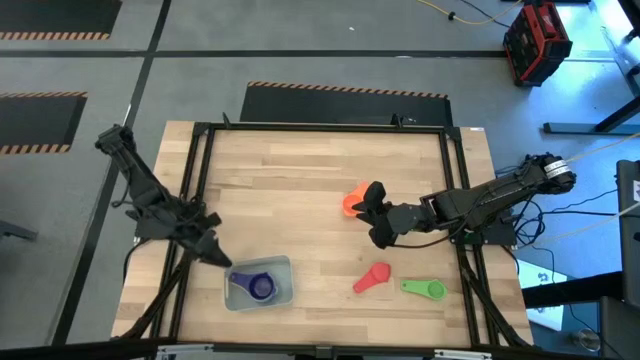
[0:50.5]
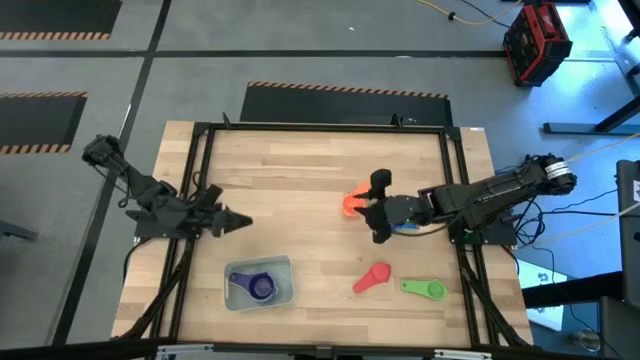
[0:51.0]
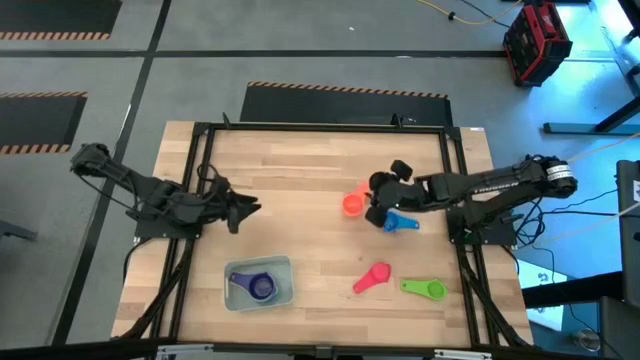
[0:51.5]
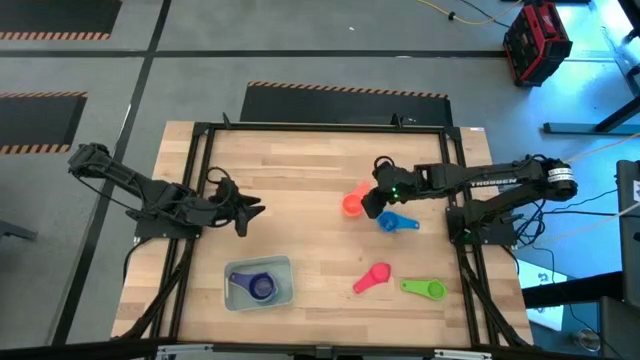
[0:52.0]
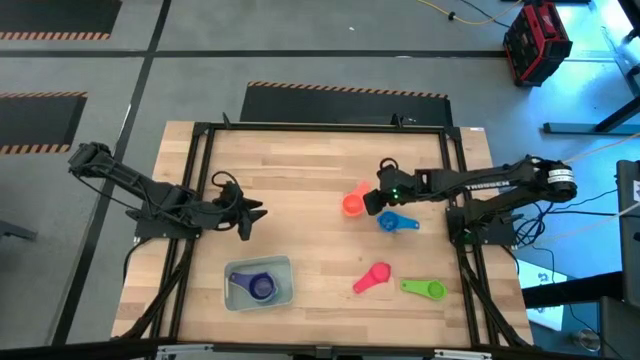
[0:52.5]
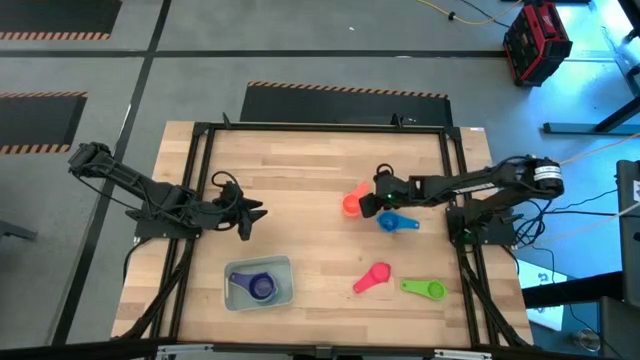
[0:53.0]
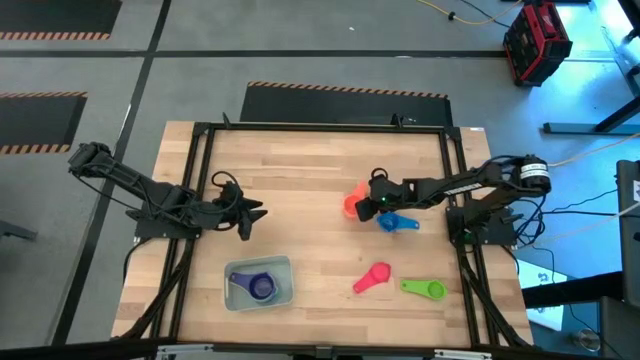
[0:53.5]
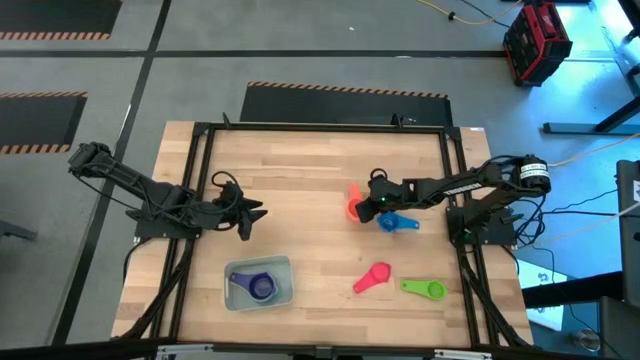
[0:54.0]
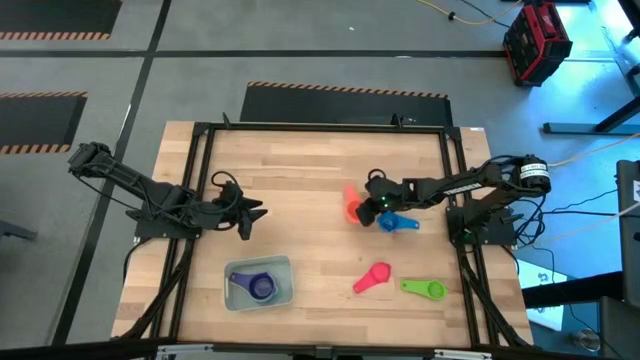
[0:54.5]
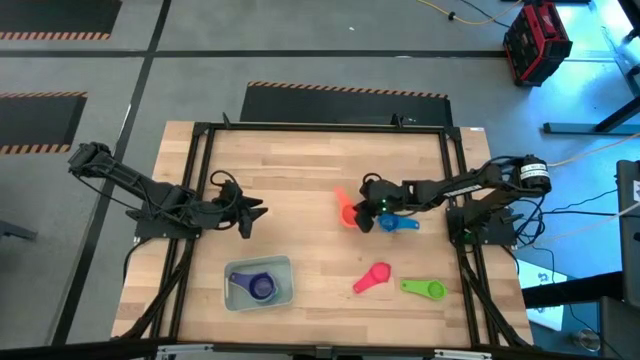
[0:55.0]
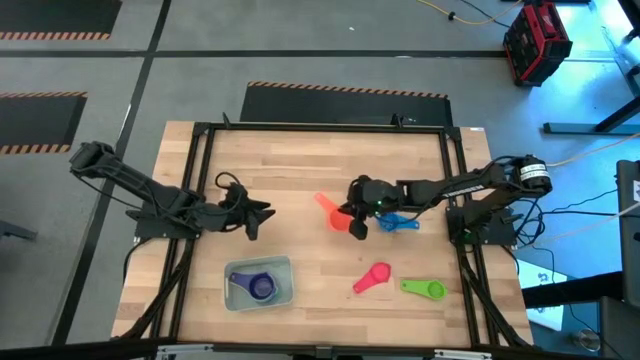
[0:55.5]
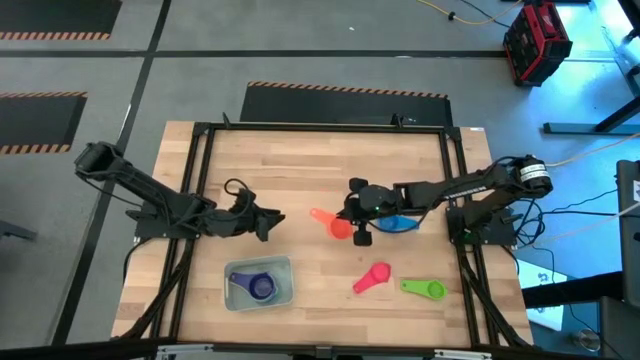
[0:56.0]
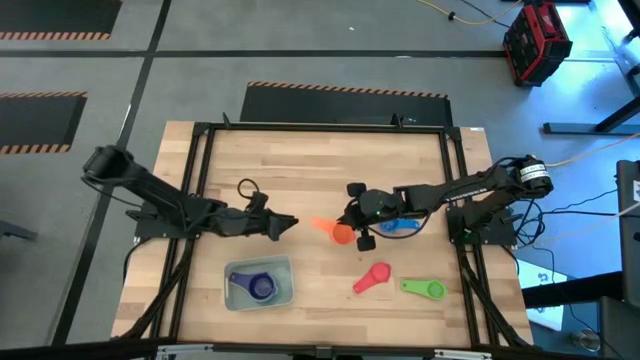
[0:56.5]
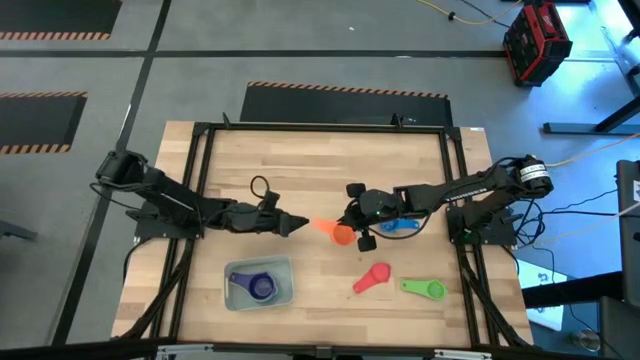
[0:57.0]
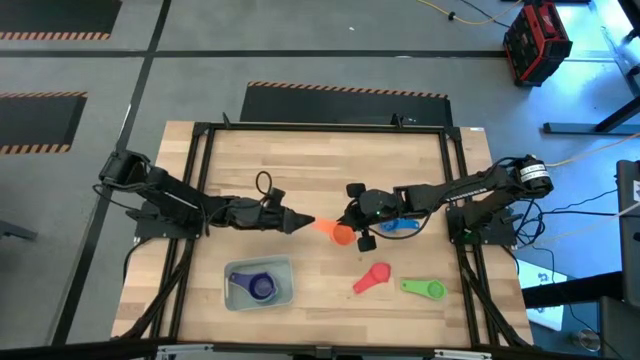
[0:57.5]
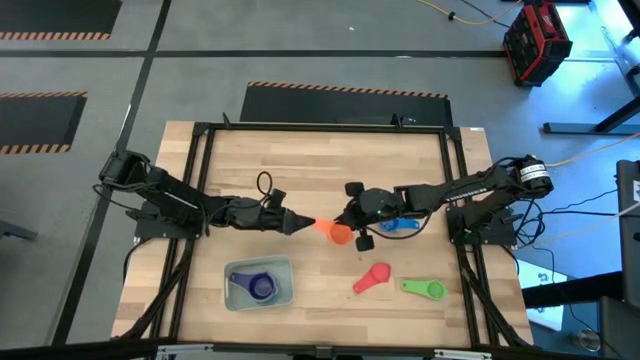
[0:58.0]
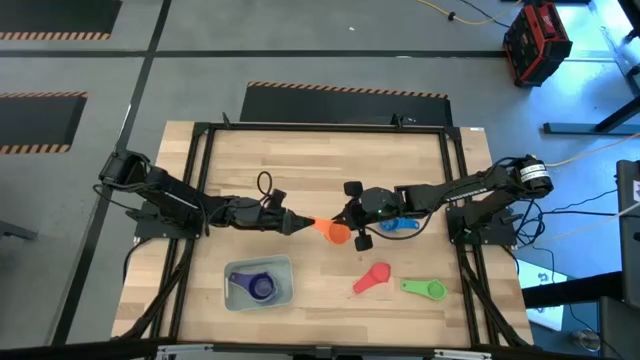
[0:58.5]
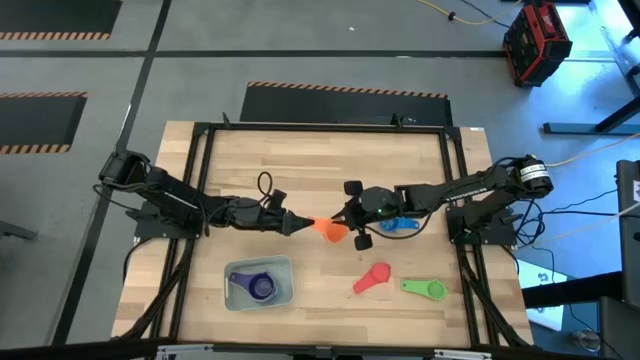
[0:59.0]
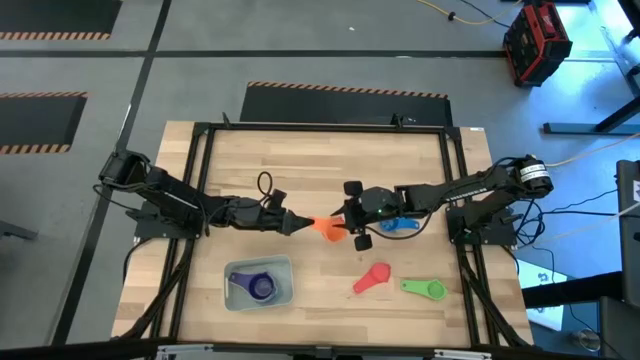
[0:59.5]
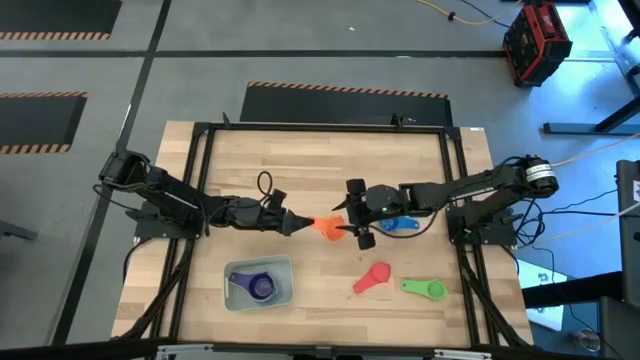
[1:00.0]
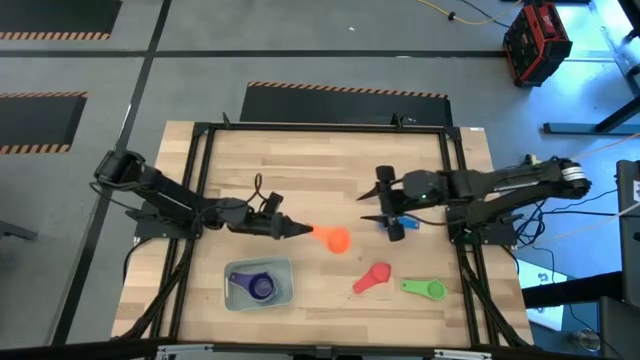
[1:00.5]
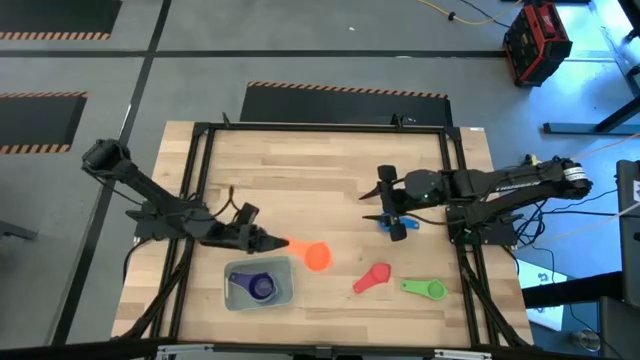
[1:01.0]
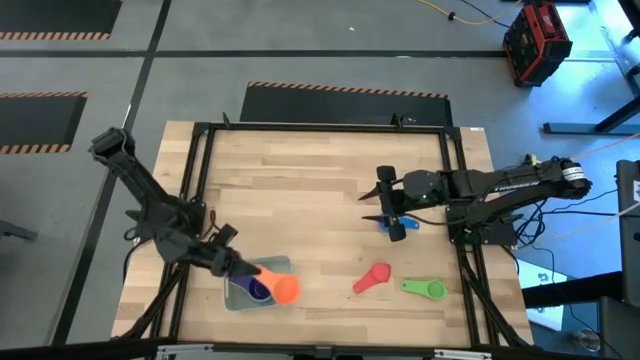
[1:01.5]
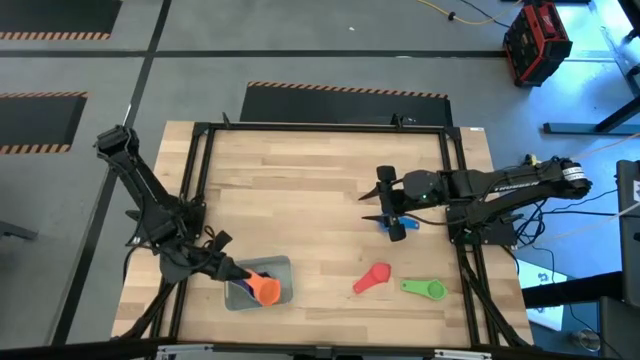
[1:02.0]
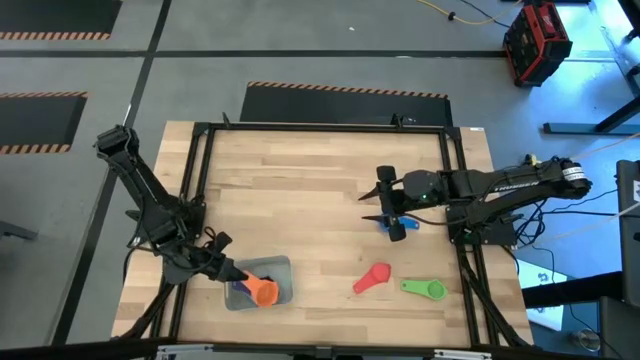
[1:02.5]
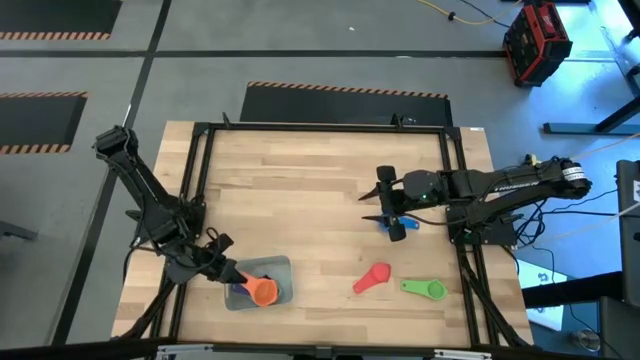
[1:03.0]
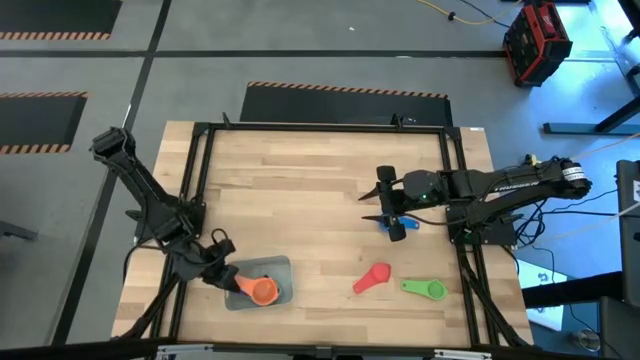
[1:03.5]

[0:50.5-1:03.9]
Task: Nest measuring cups in basket
Stack the orange measuring cup on top of the violet measuring cup in the gray bin

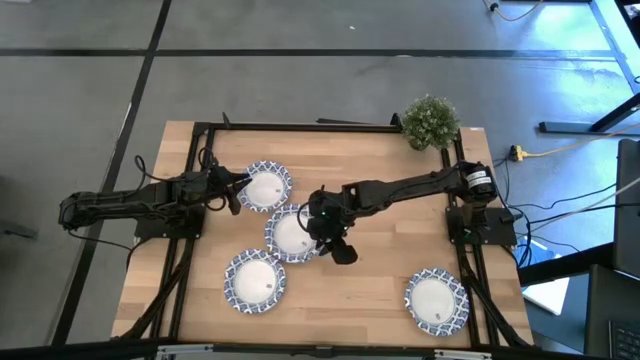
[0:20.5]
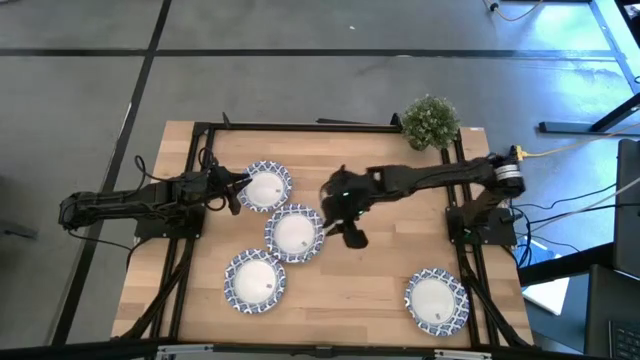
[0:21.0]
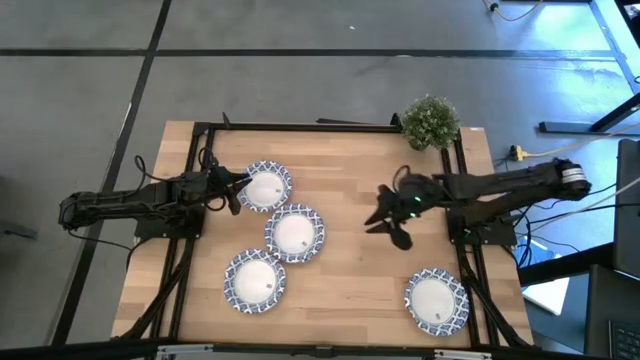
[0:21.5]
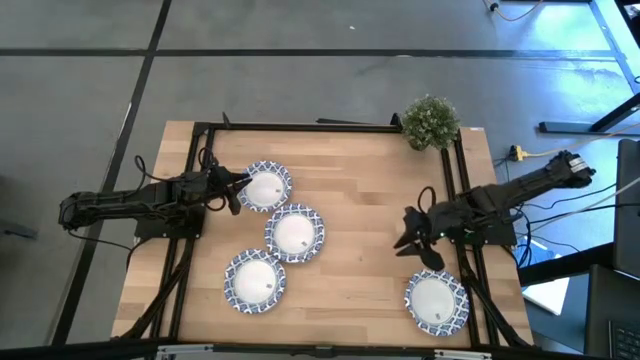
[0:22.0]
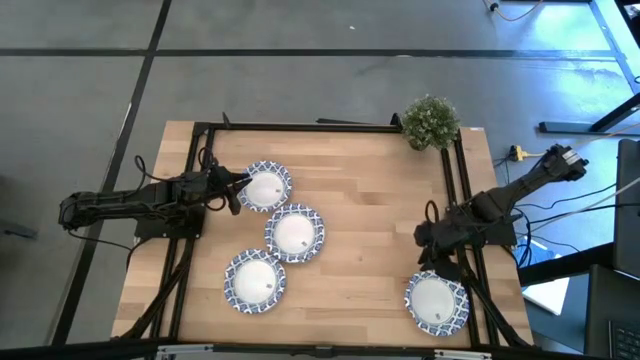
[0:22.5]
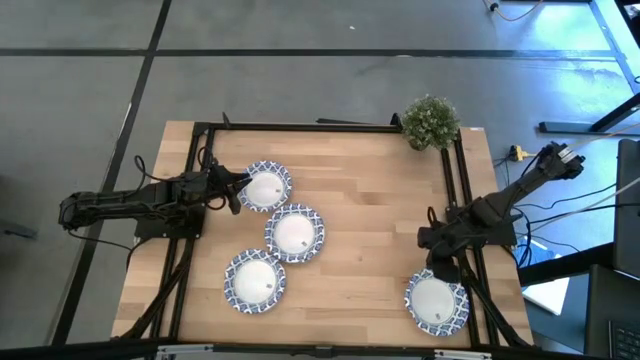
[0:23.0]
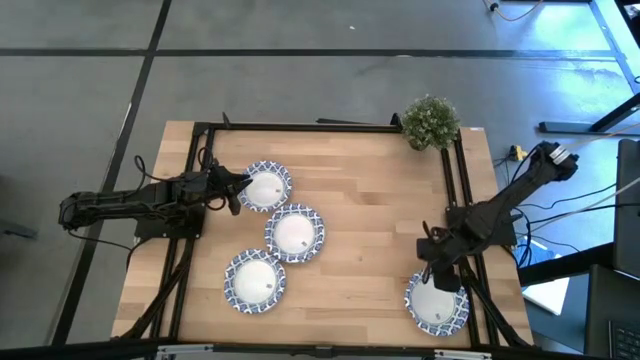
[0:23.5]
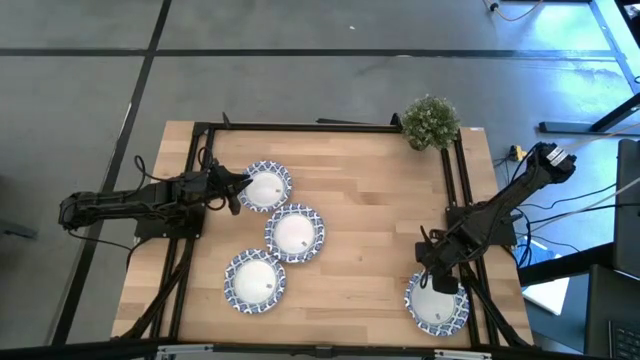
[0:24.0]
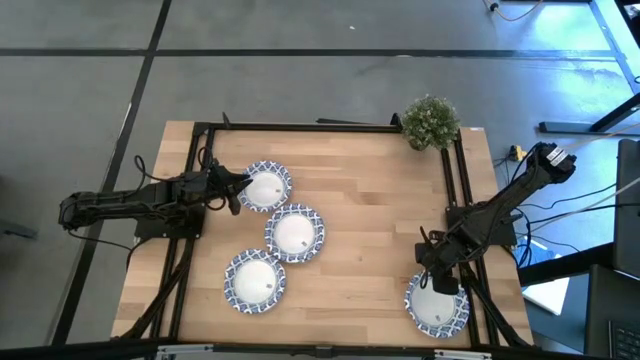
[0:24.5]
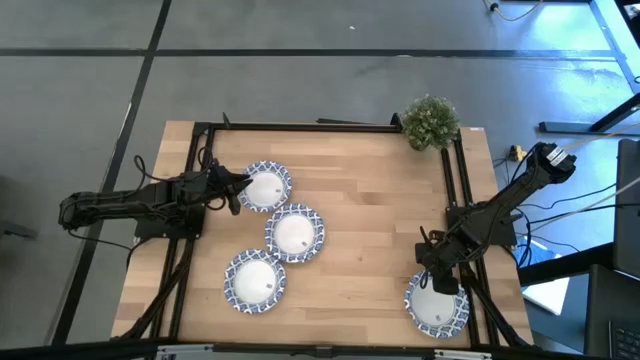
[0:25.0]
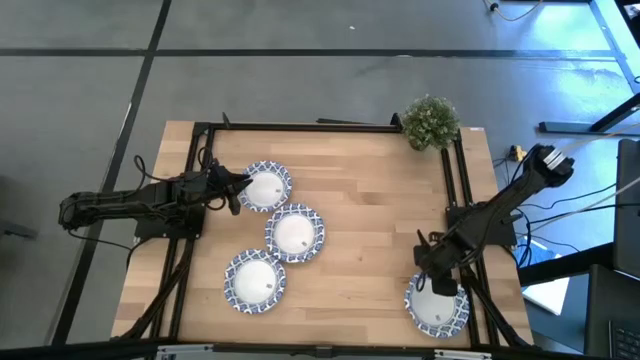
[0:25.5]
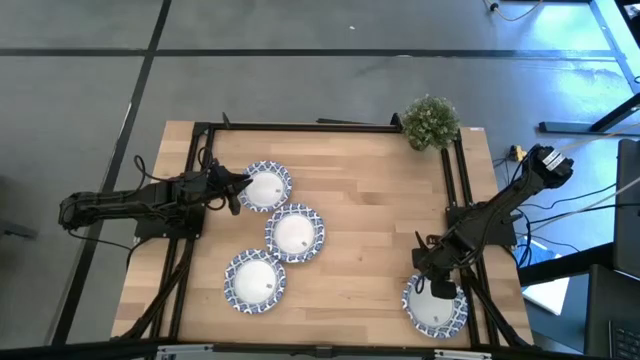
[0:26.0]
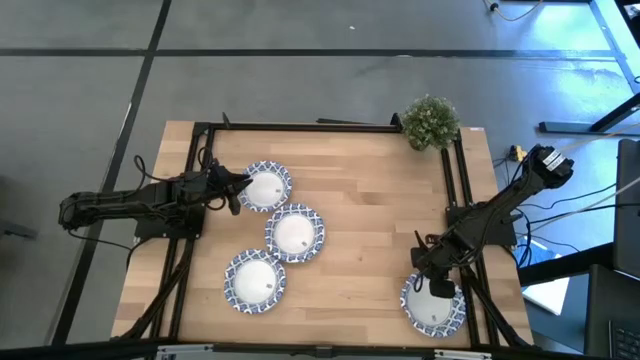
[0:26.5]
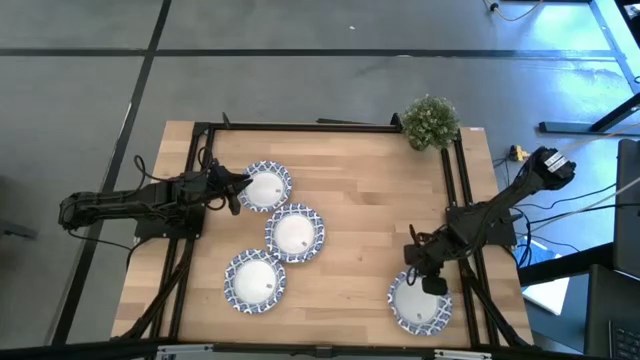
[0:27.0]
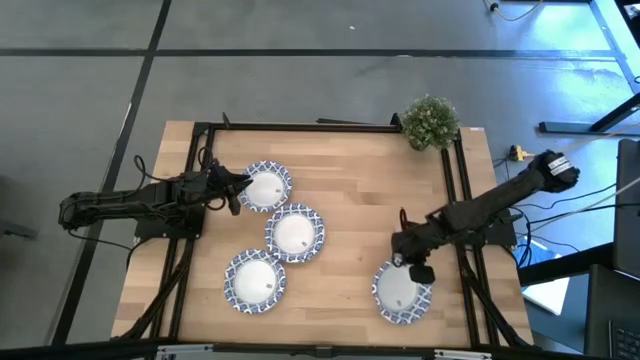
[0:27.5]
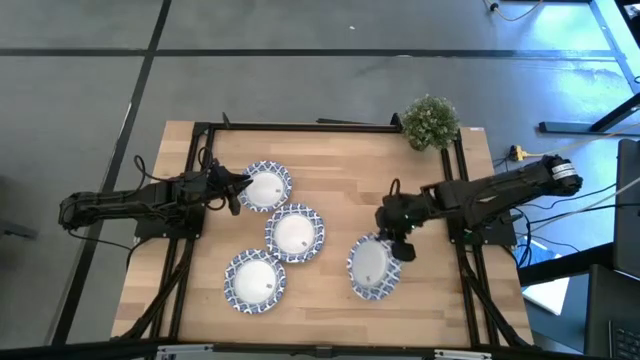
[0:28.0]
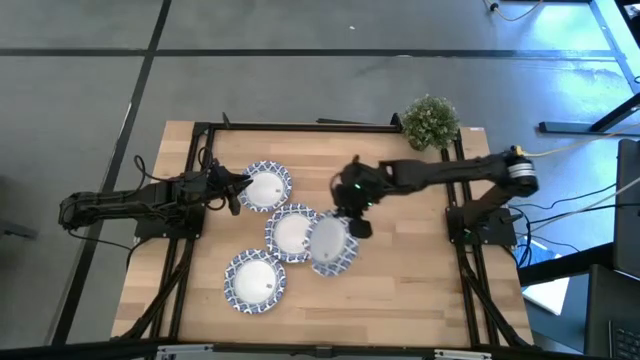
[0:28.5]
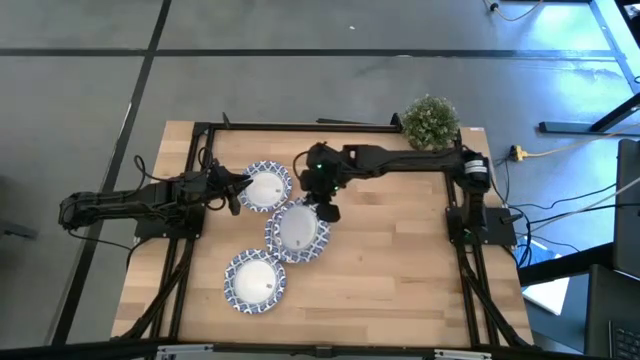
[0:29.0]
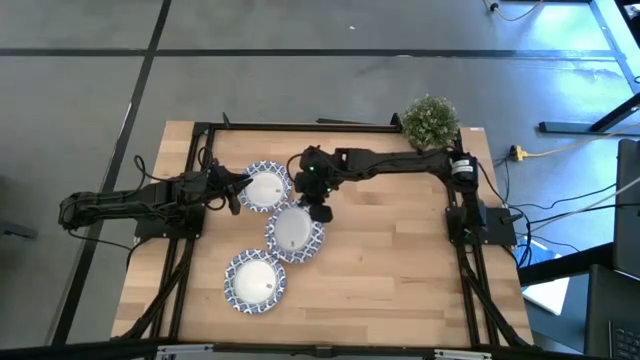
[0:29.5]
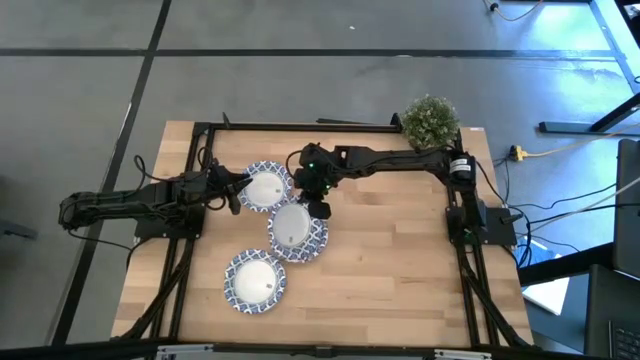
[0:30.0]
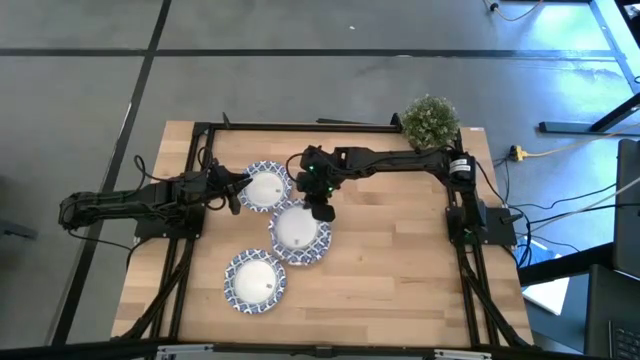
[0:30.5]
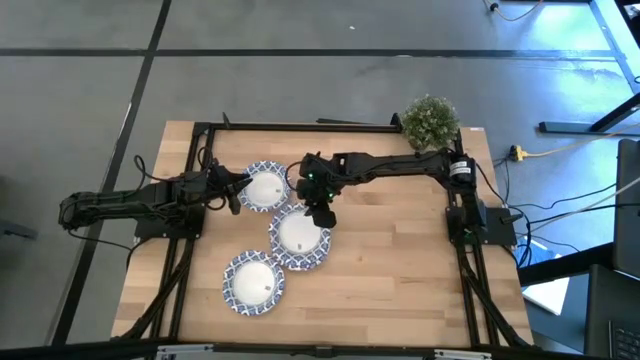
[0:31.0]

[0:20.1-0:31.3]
Task: Nest bowls inside each other
Stack the white patterned bowl on top of the other white patterned bowls
